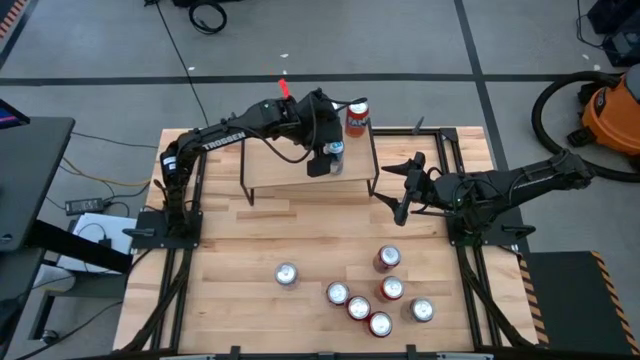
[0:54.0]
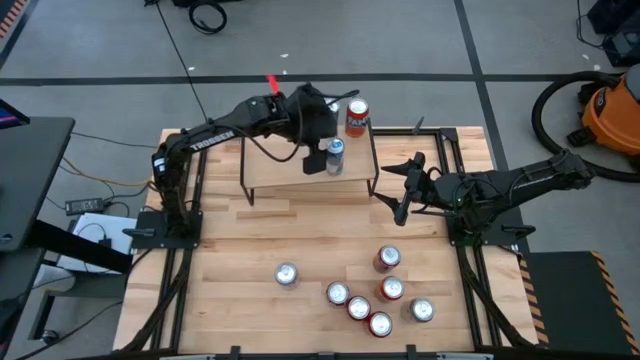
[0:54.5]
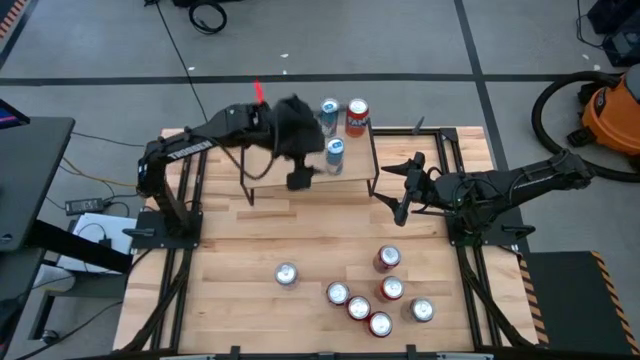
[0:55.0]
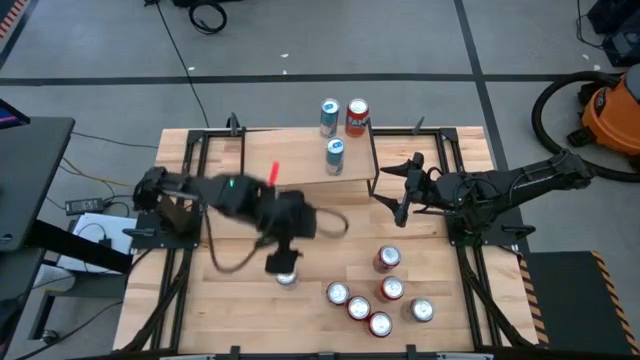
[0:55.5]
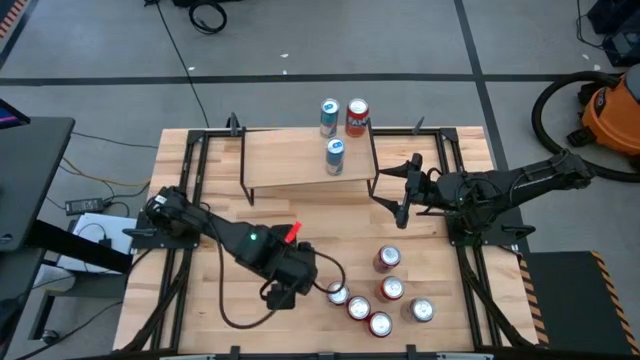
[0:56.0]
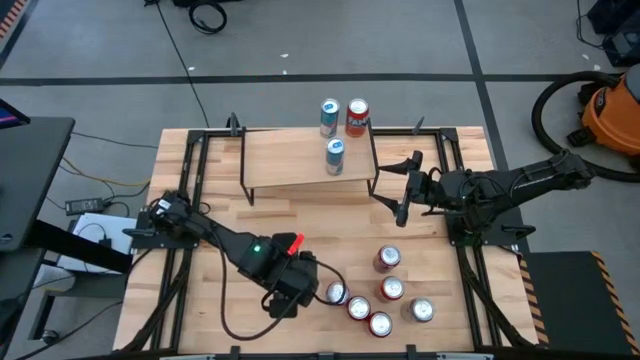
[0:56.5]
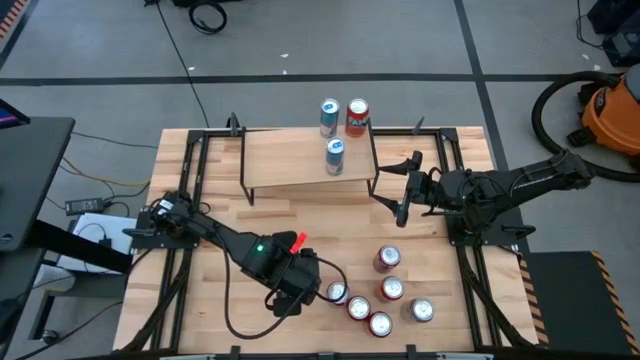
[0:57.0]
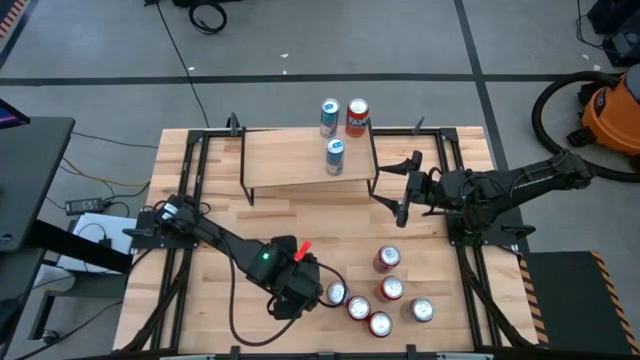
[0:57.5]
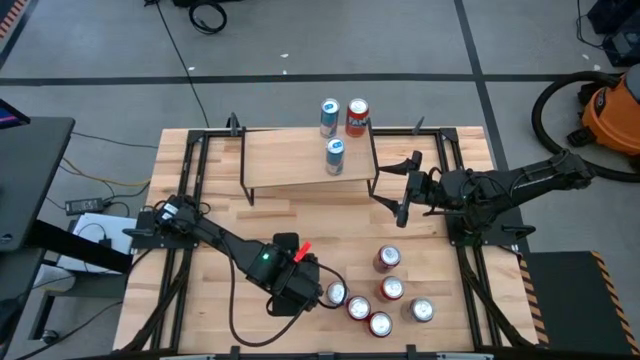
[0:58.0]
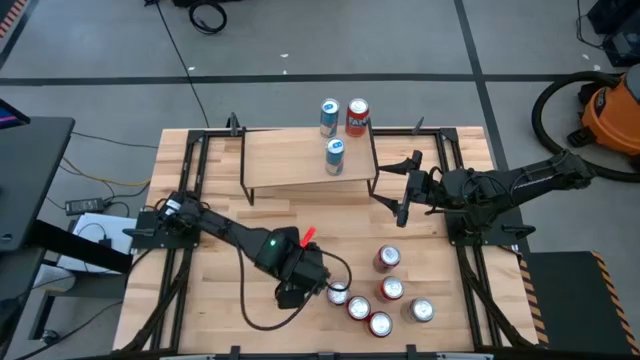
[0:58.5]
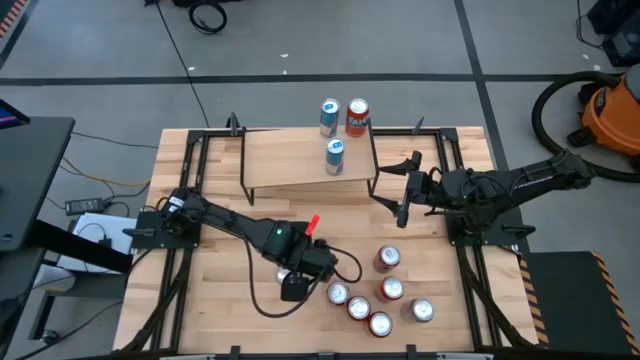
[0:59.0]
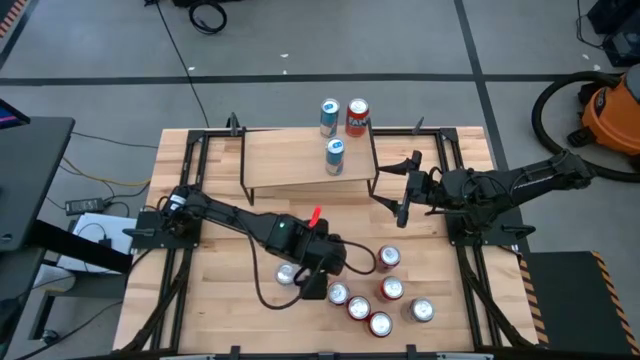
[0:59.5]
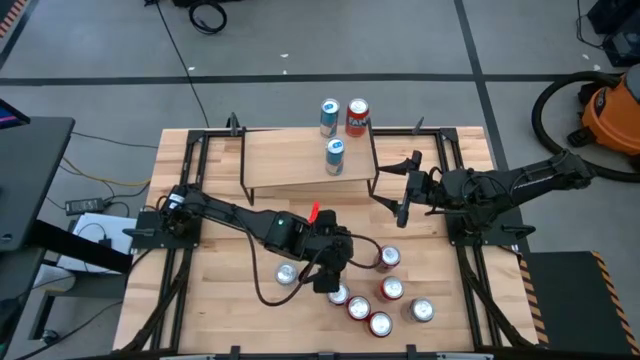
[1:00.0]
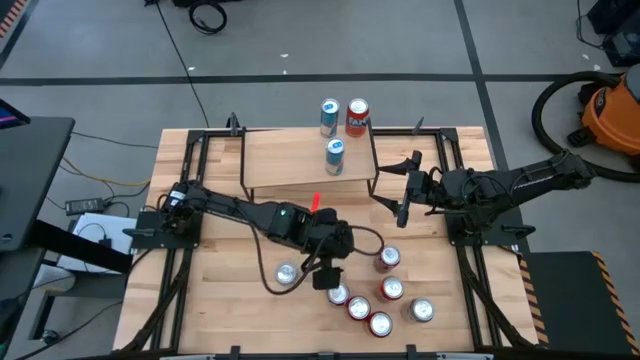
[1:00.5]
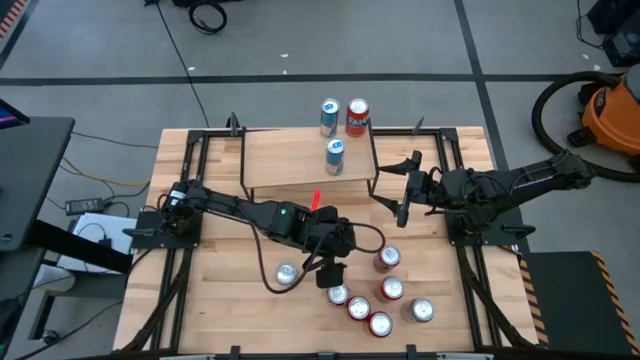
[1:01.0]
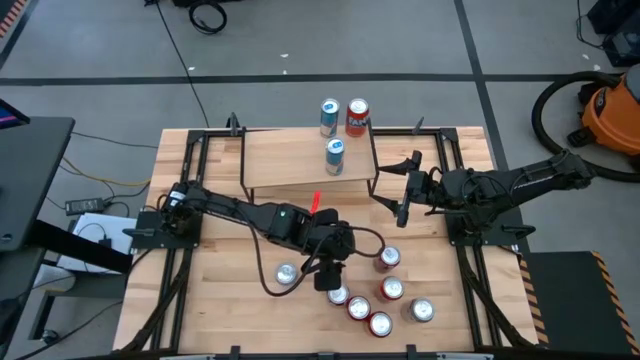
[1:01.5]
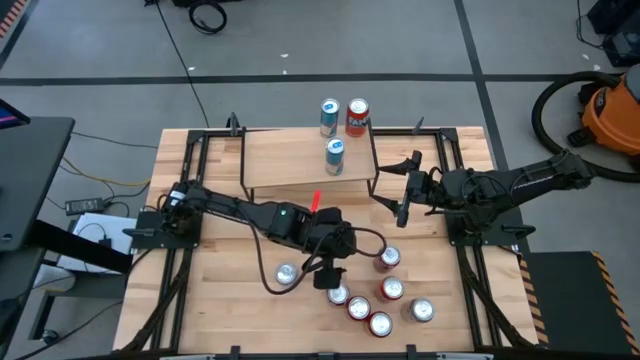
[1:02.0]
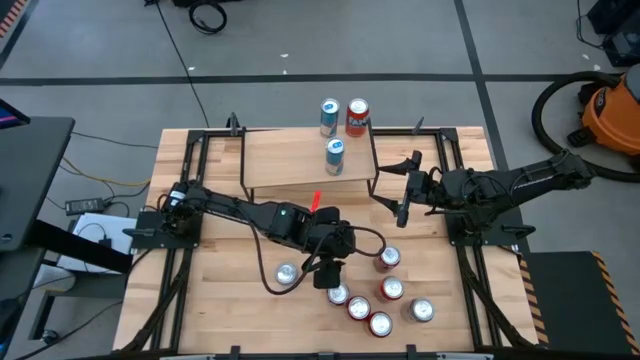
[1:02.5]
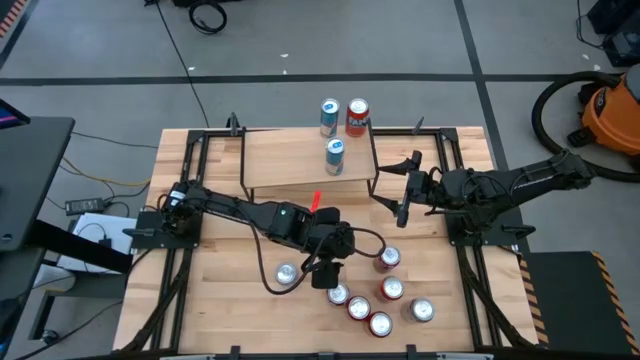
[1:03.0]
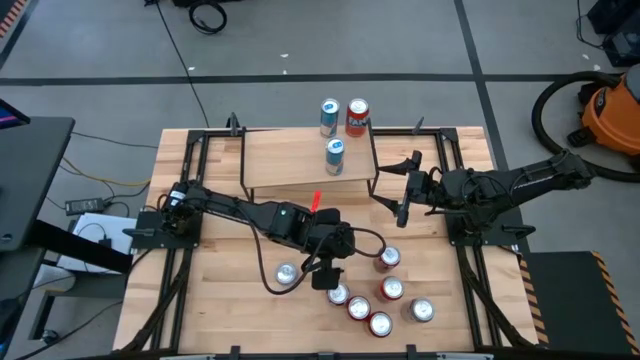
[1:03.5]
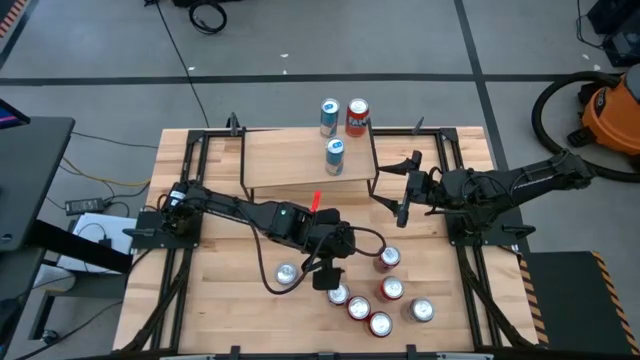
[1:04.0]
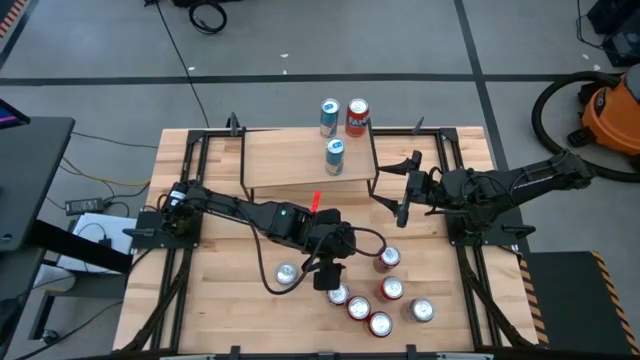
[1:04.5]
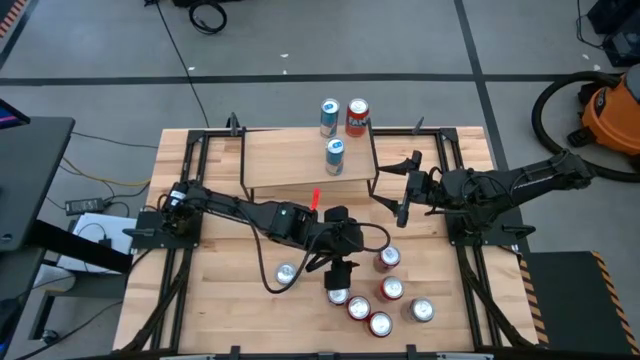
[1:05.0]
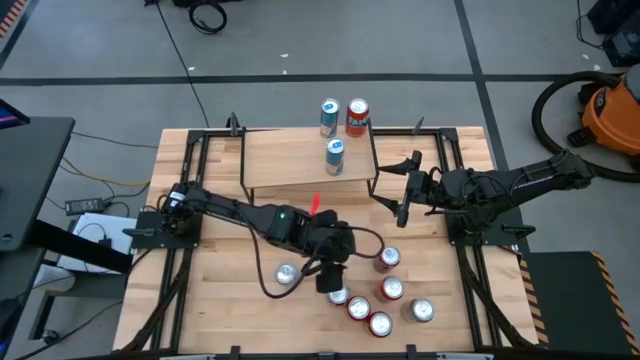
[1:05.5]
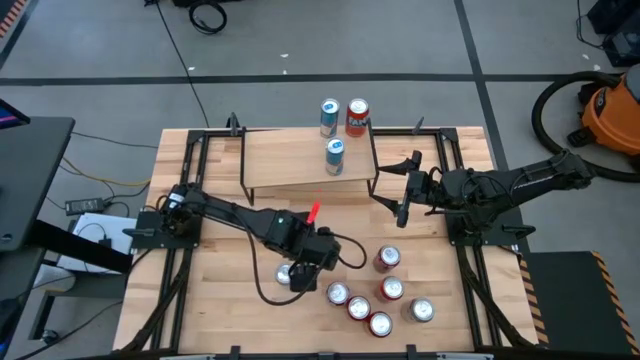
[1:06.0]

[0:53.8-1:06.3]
Task: Place canned beverage on shelf
Put the left silver soda can on the shelf

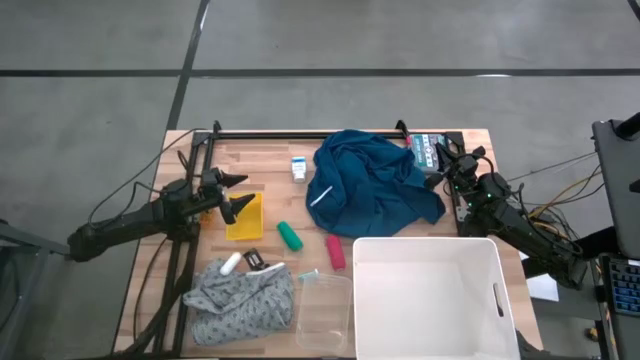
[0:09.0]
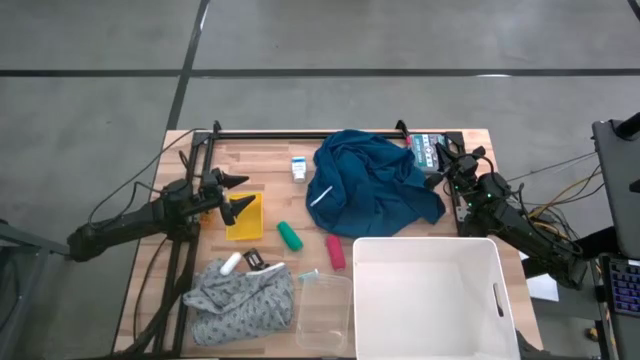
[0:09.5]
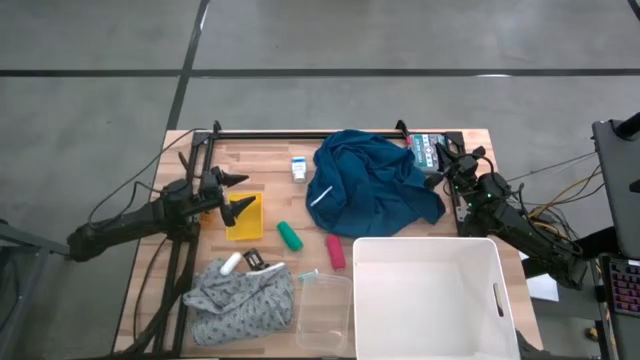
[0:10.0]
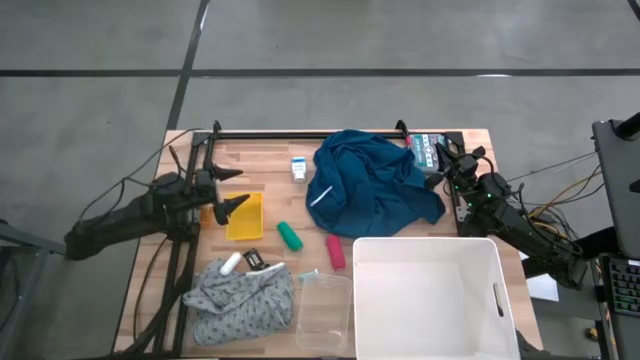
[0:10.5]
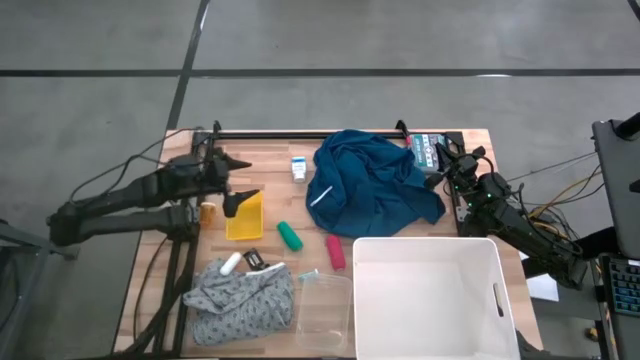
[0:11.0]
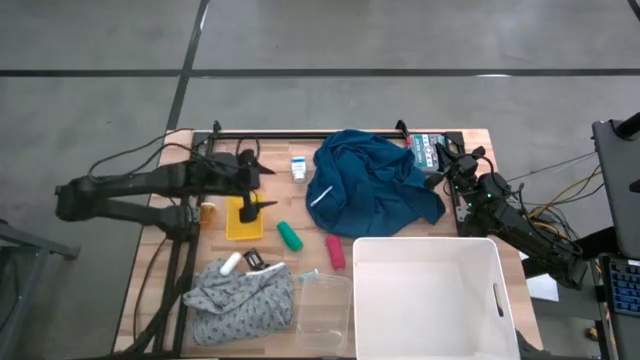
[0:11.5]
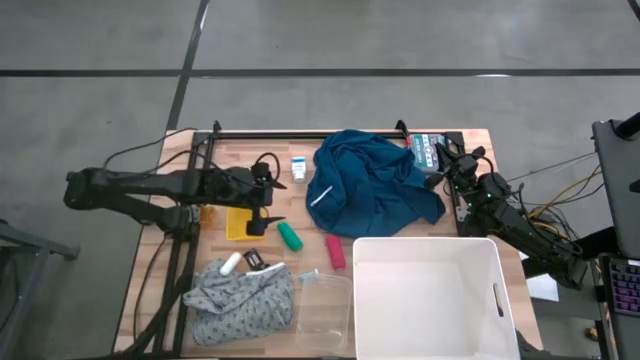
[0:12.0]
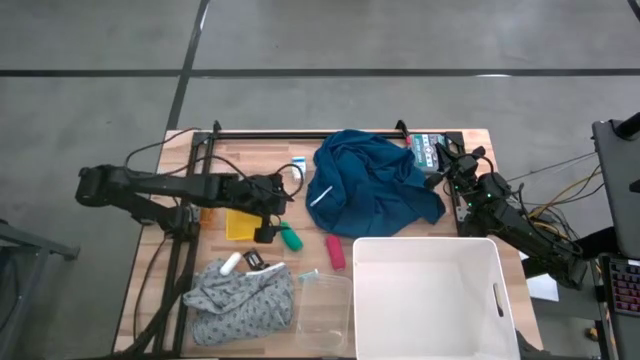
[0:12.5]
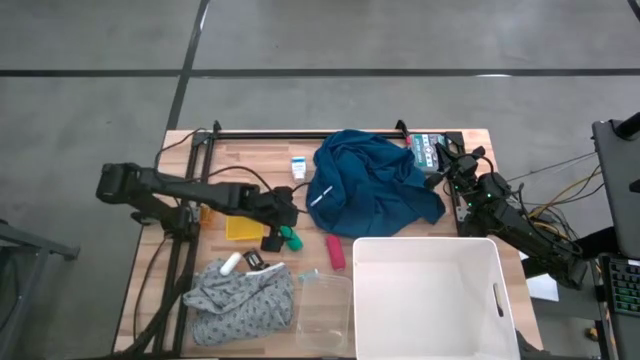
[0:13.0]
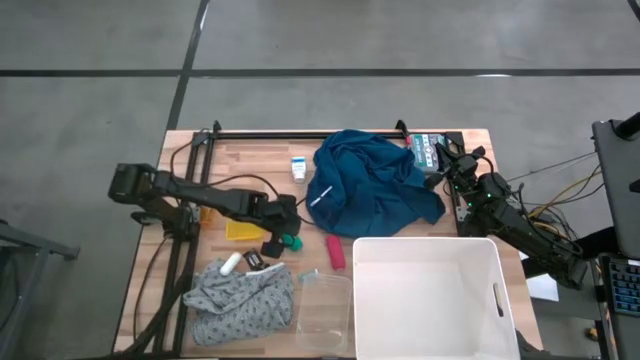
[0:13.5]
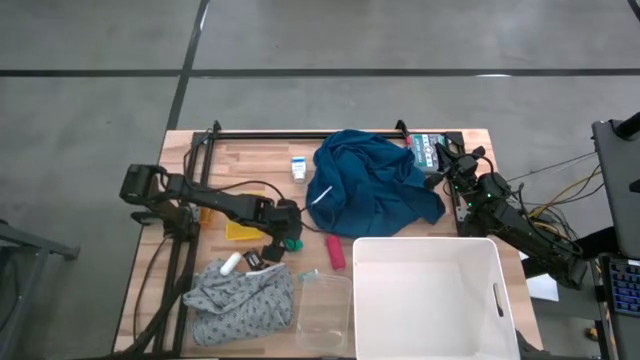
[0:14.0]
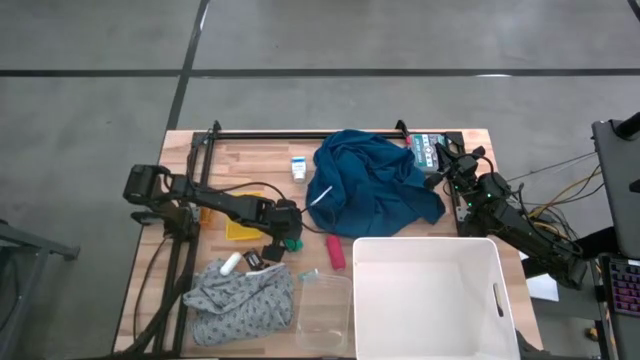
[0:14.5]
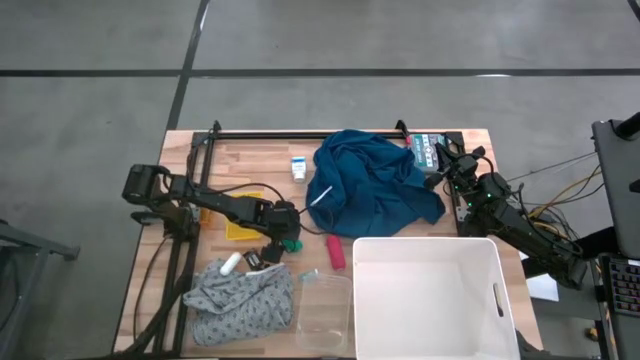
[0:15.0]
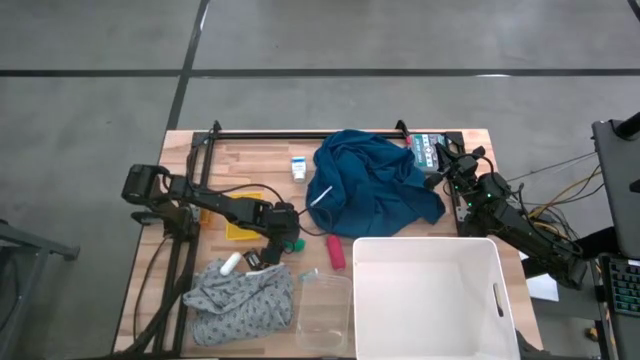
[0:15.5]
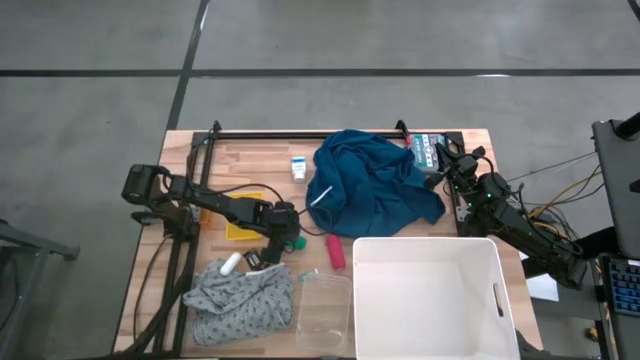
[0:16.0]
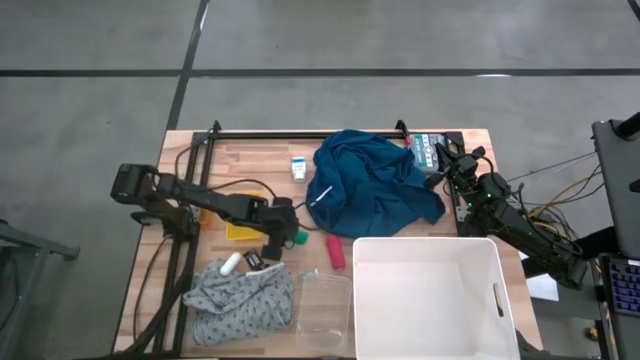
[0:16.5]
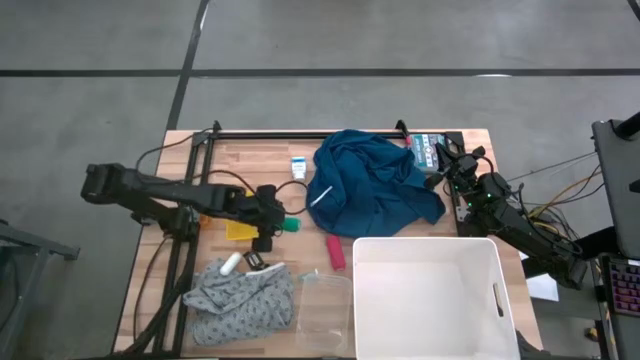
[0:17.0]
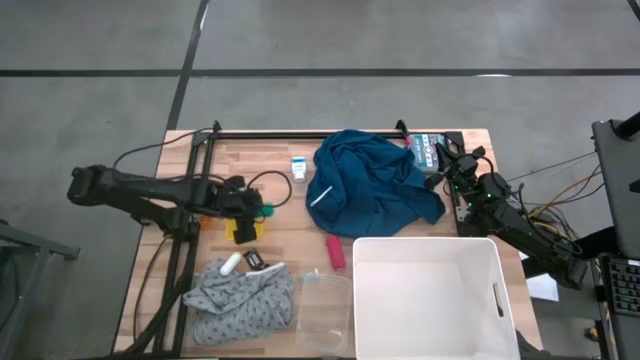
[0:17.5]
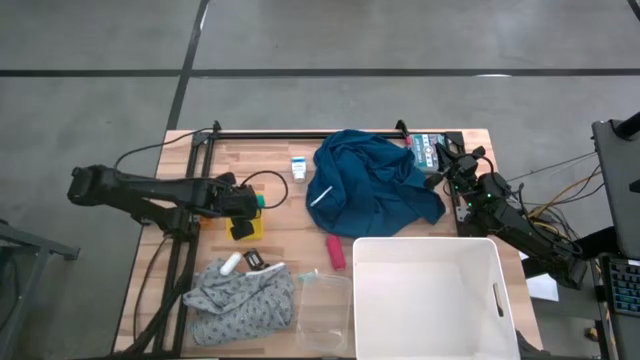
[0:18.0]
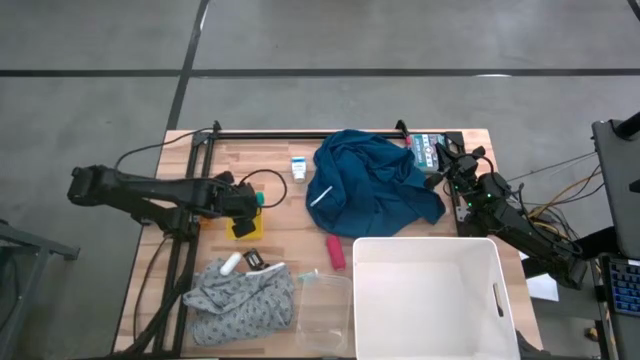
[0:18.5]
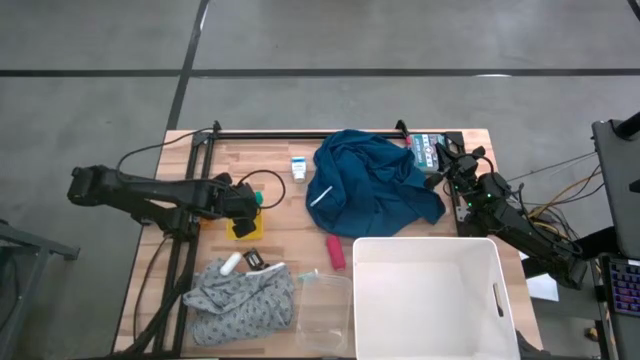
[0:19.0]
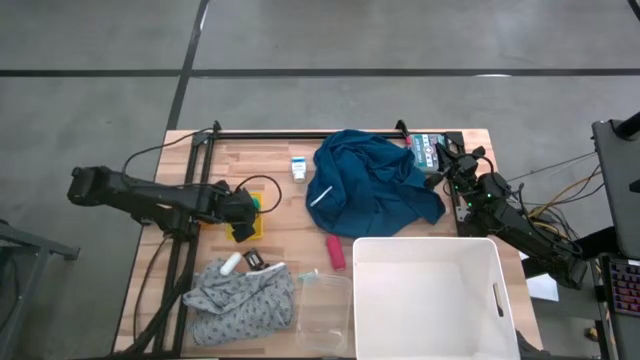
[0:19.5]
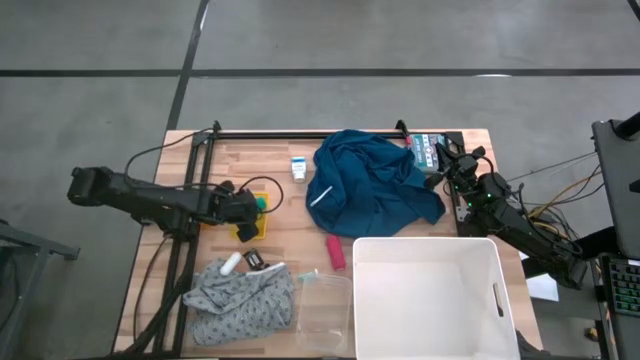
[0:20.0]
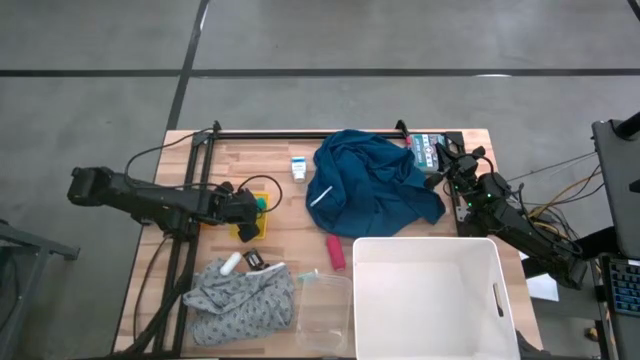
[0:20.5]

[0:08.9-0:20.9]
Task: Pick & Place Medicine items
Put the green rolled bandage into the yellow bin
